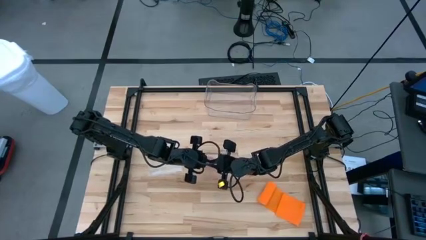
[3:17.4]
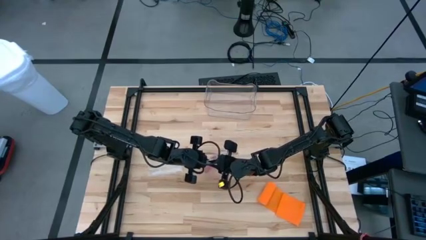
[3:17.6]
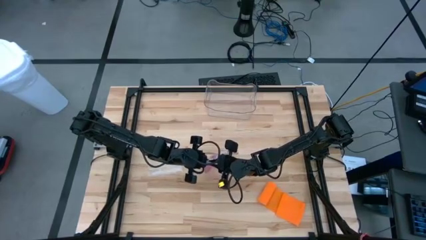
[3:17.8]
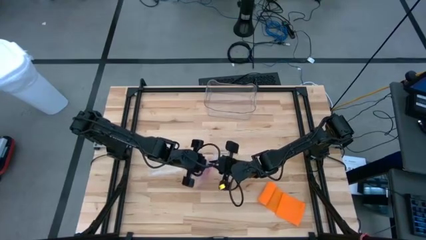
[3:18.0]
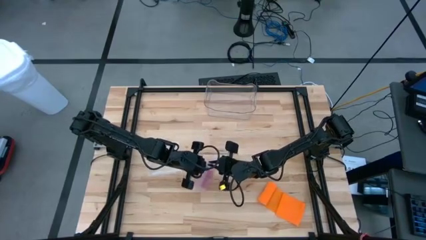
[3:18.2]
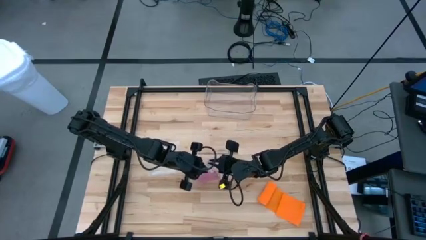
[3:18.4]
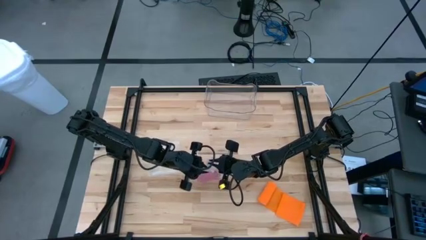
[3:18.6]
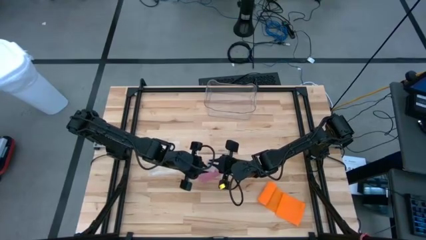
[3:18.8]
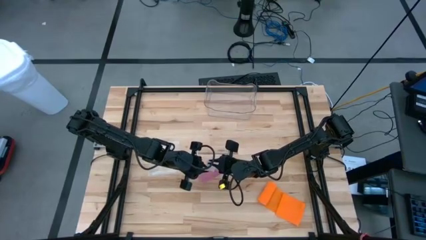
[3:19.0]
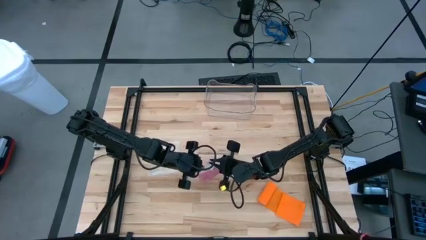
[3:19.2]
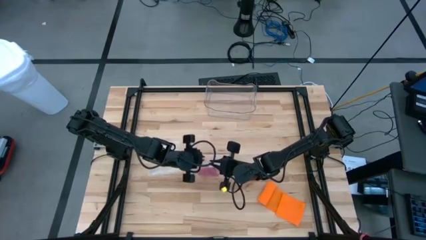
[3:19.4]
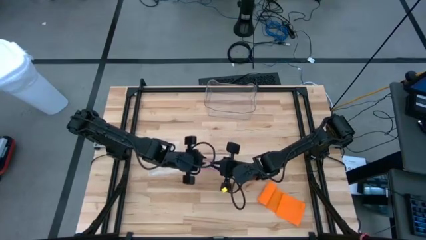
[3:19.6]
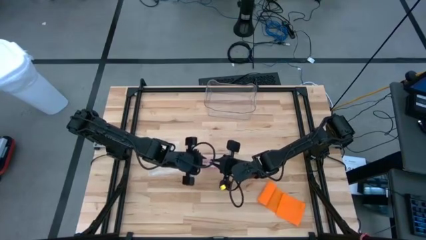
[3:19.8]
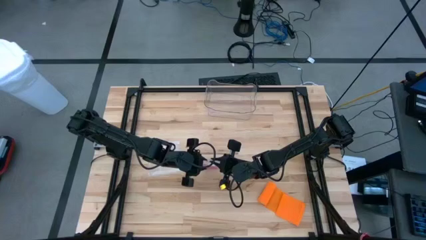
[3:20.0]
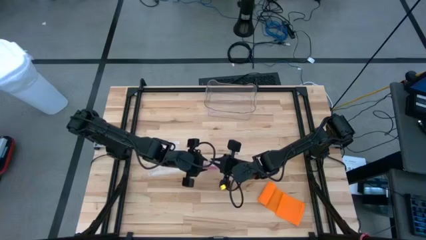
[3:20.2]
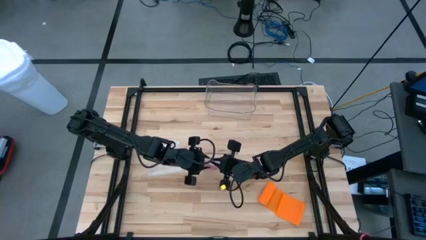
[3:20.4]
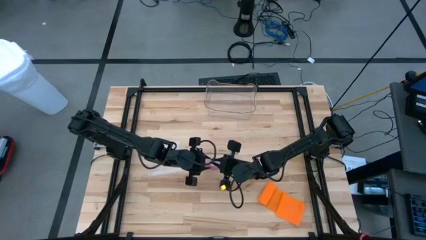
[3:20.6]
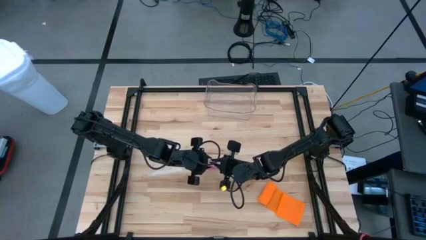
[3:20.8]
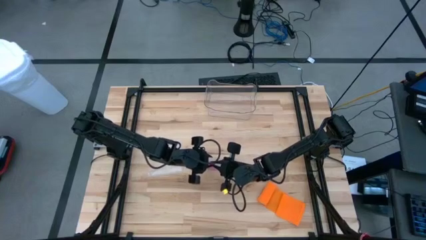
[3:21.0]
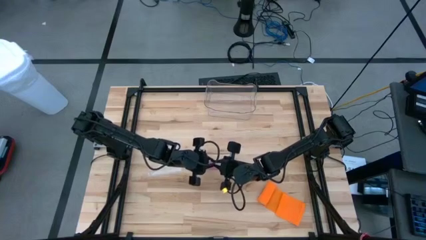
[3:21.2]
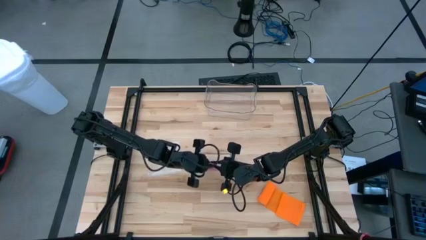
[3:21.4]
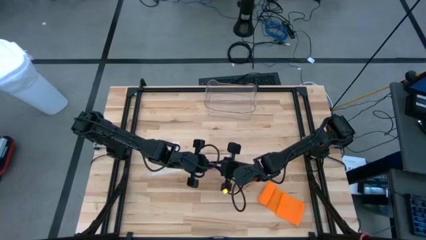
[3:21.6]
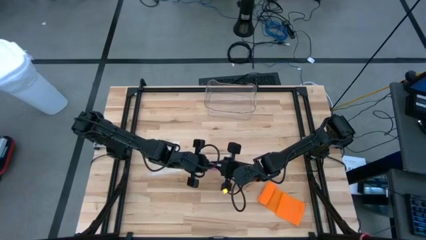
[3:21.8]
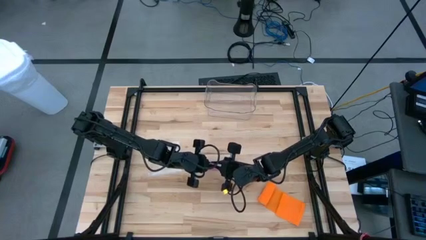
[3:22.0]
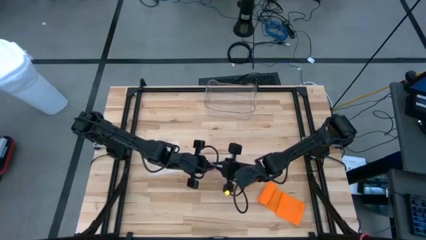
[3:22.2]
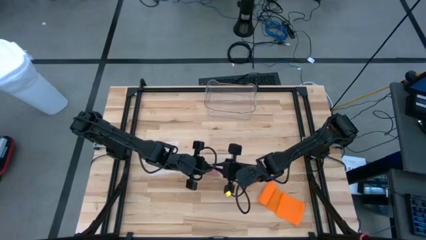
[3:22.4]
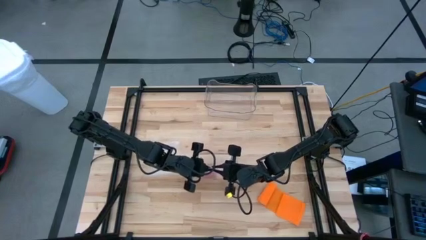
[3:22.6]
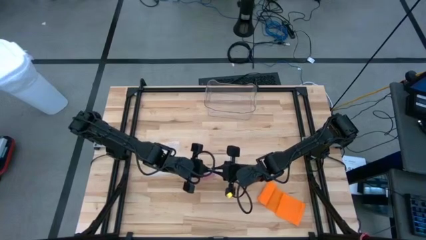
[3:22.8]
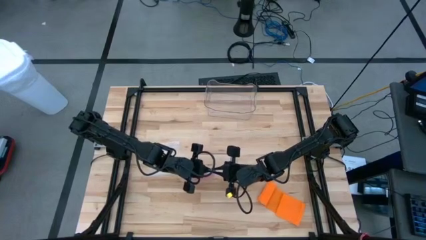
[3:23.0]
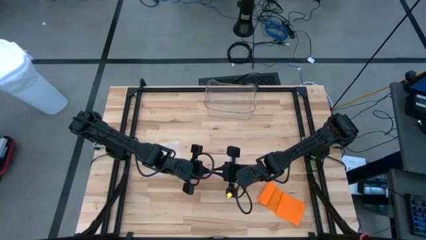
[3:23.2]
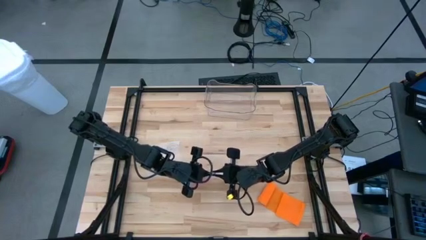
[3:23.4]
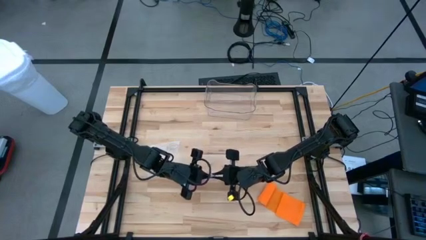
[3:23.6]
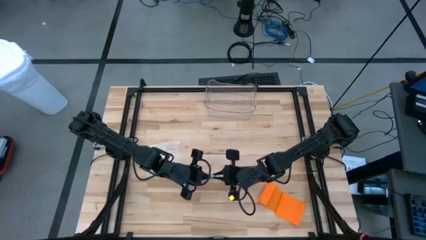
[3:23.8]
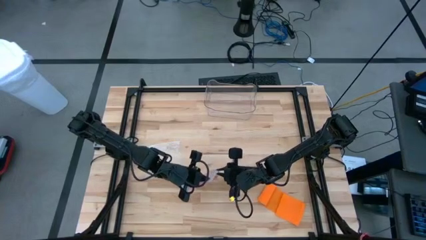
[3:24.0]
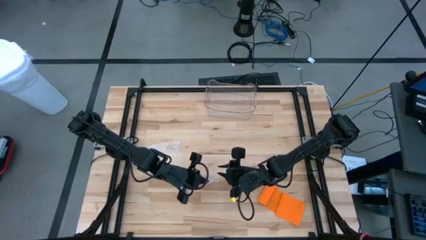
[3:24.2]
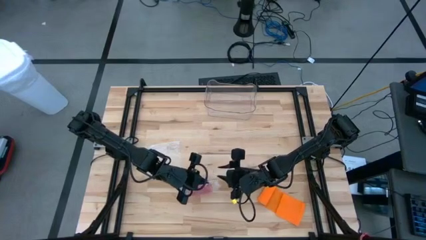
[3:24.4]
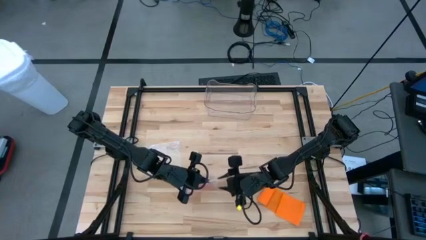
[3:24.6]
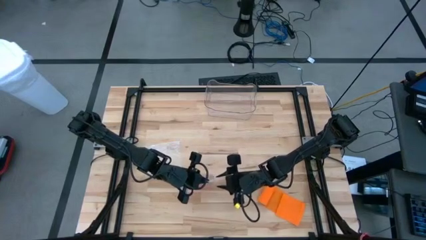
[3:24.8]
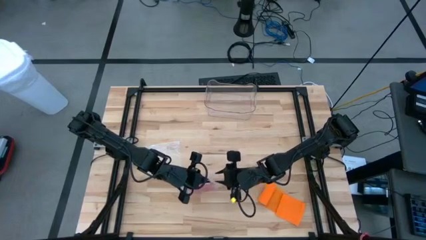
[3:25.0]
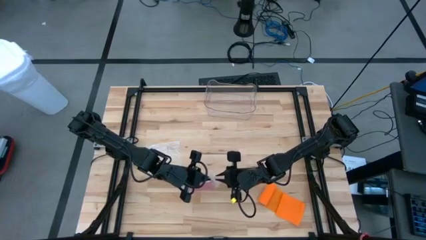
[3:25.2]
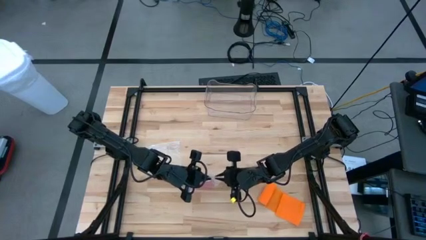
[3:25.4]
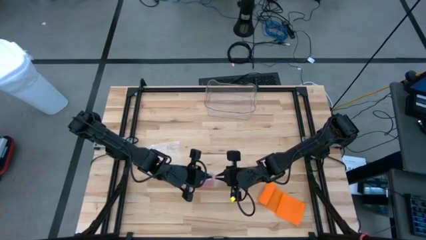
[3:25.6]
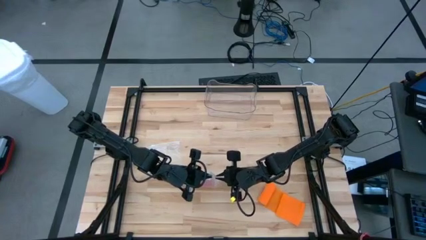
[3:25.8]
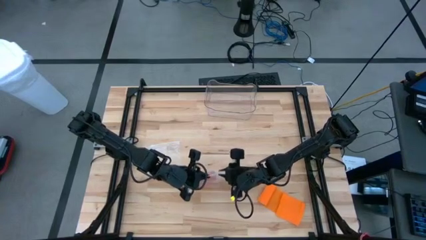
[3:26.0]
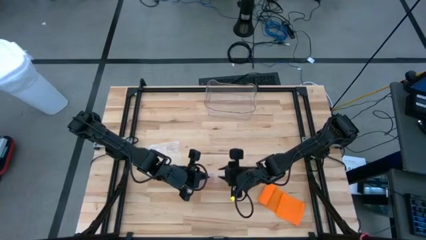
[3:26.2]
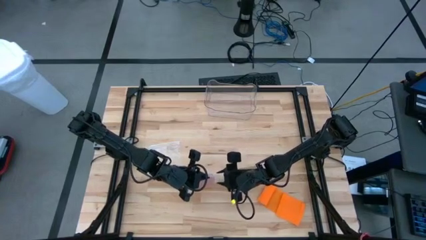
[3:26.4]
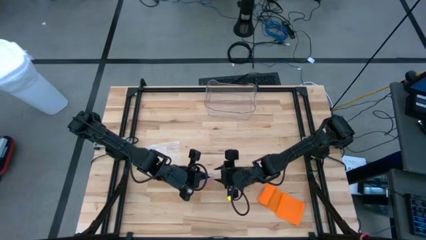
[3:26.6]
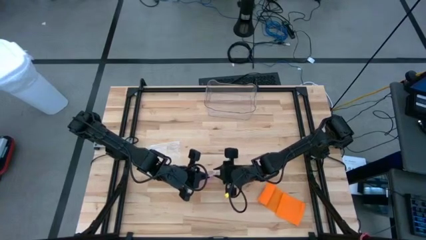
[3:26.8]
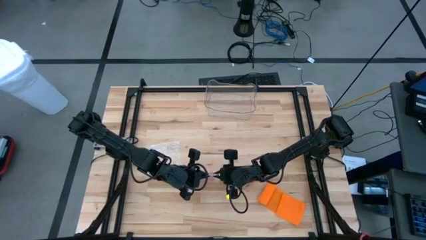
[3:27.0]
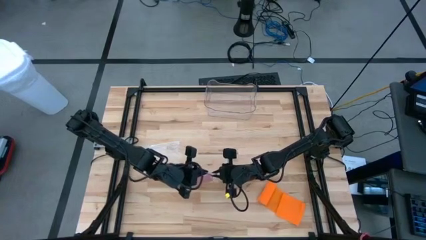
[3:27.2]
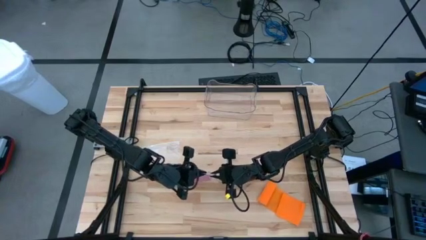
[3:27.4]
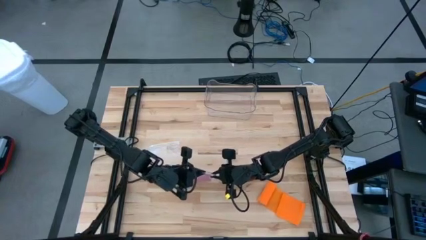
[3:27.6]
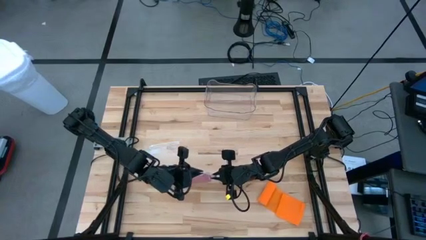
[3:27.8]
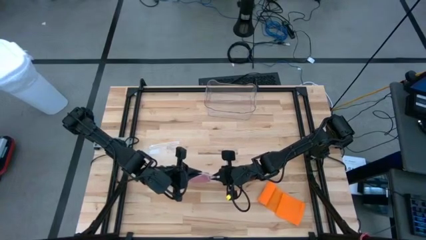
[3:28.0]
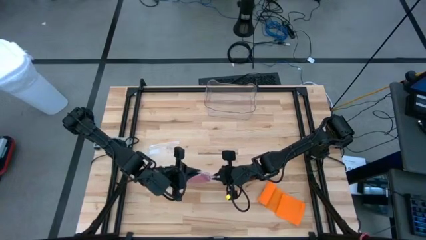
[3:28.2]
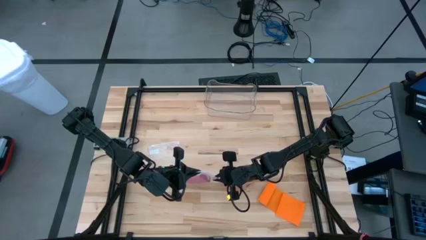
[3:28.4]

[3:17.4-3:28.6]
Task: Roll bandage
Close the zip bag

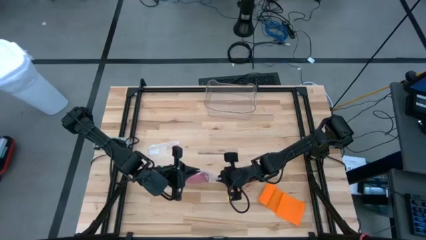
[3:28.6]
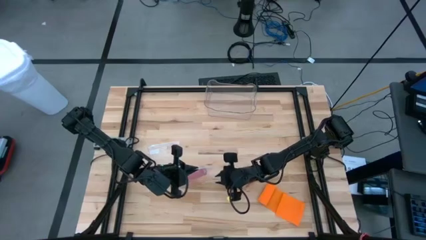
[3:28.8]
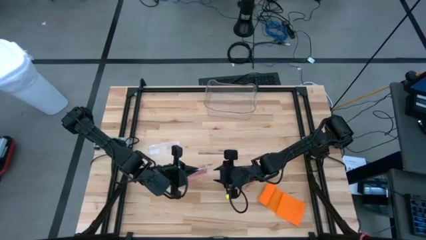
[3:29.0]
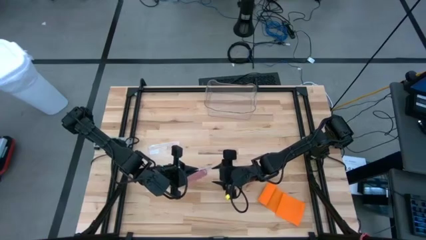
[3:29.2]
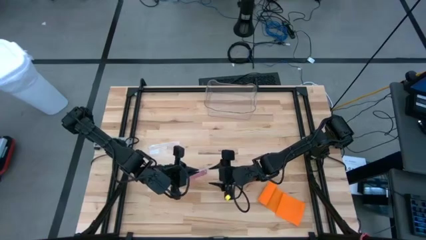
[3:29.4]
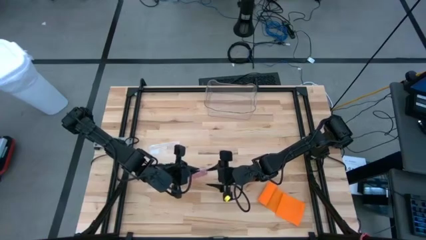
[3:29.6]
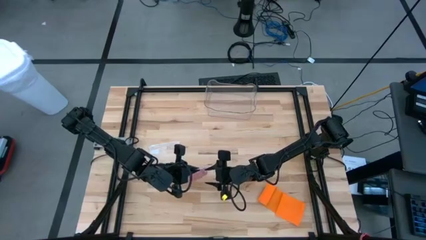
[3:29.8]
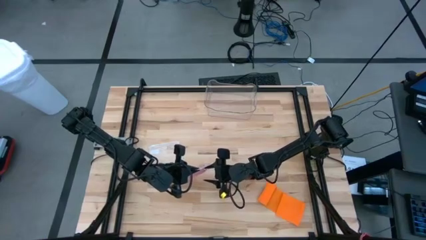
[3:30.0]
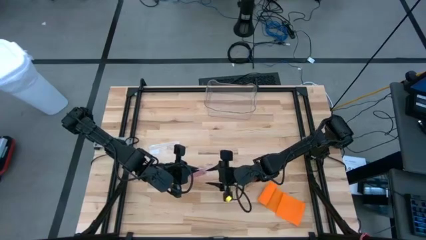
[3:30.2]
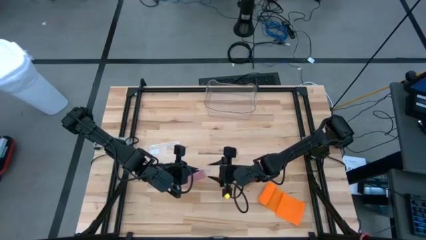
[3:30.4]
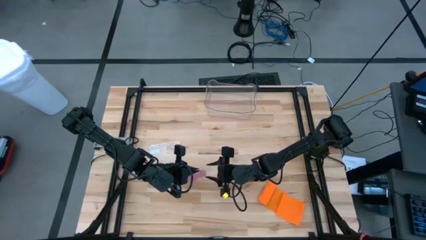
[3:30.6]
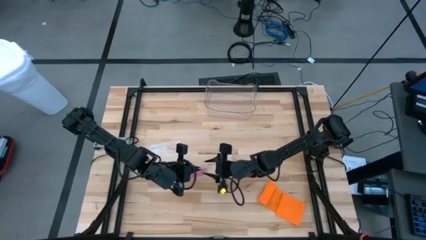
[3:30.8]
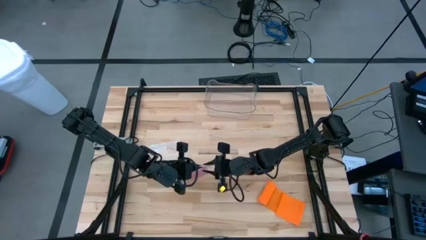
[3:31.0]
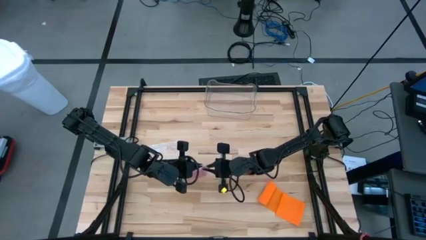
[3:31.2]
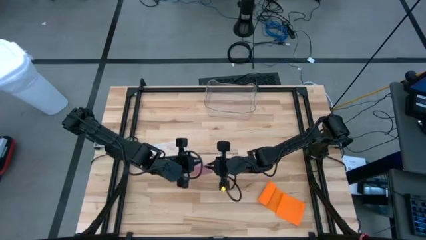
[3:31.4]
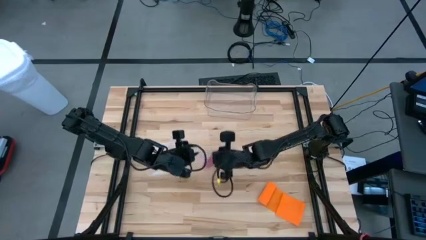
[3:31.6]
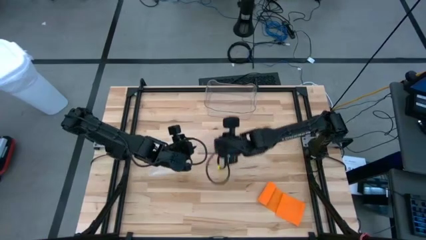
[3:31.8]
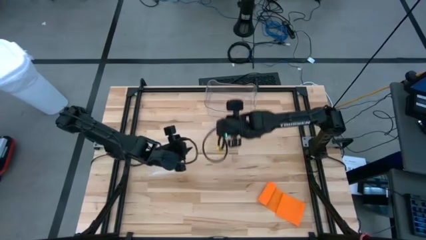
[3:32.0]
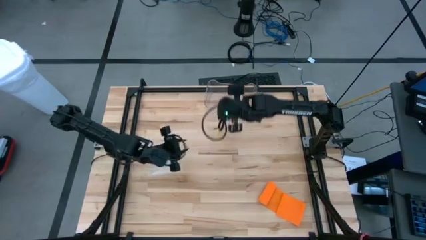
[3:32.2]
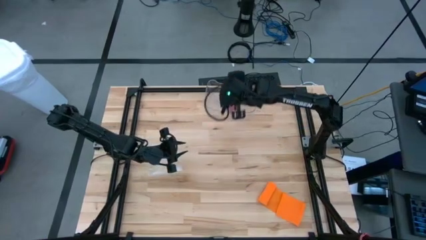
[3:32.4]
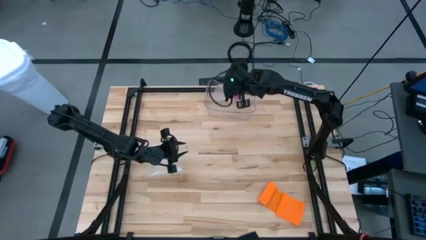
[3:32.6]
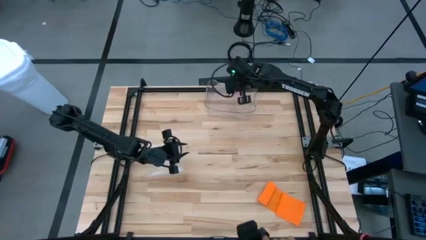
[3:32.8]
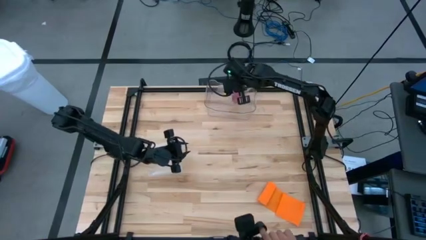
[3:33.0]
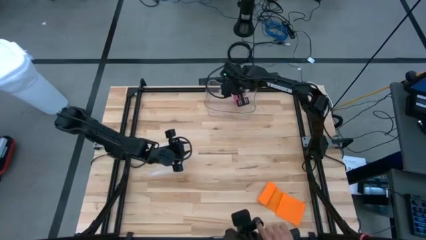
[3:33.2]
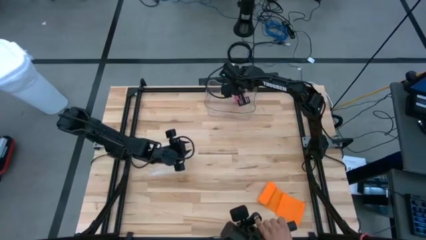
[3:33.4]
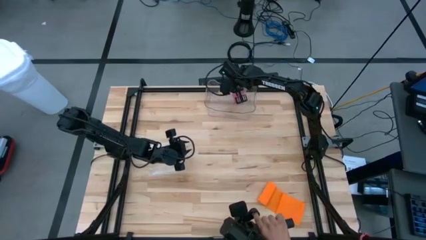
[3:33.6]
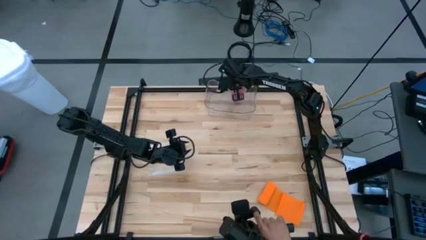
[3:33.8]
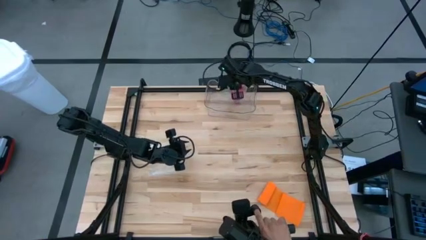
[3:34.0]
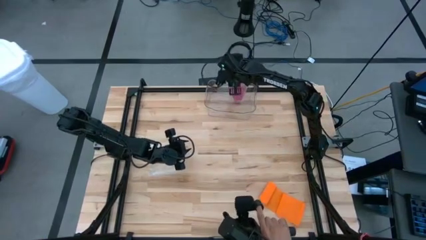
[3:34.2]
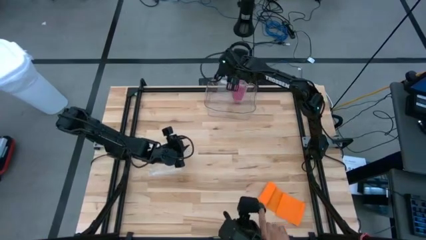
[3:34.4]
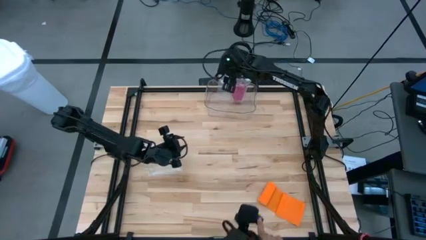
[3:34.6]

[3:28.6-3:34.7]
Put the zip bag into the transparent bin
